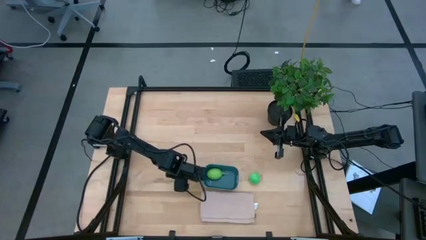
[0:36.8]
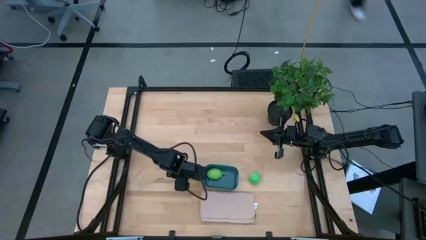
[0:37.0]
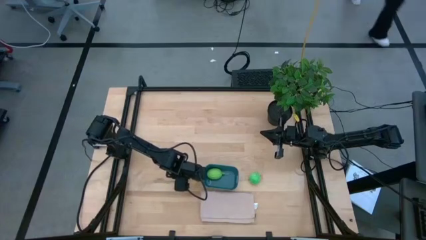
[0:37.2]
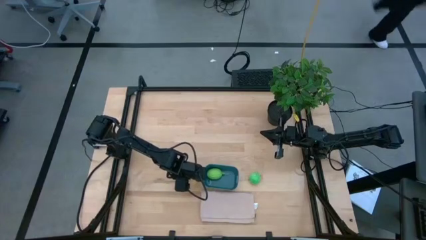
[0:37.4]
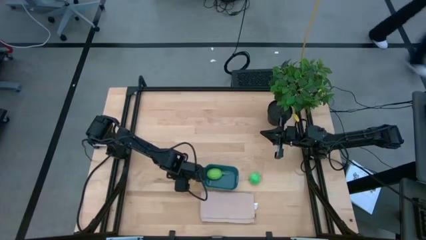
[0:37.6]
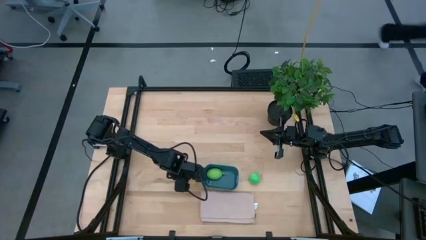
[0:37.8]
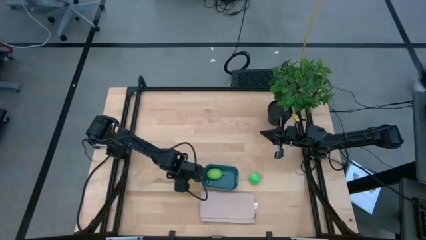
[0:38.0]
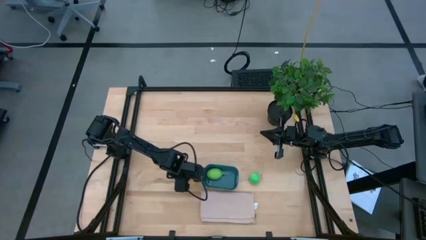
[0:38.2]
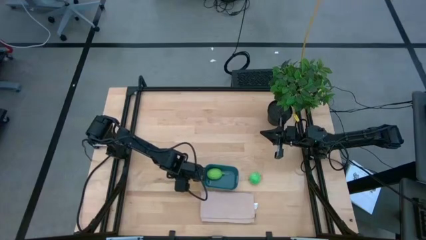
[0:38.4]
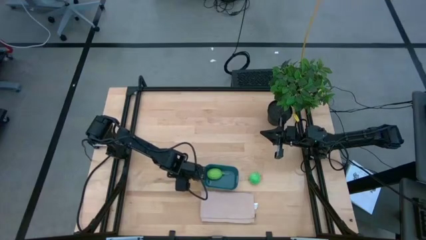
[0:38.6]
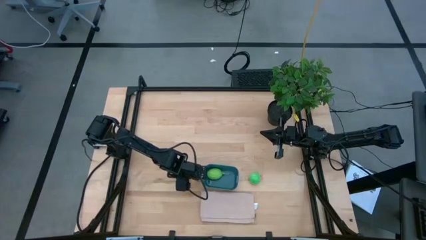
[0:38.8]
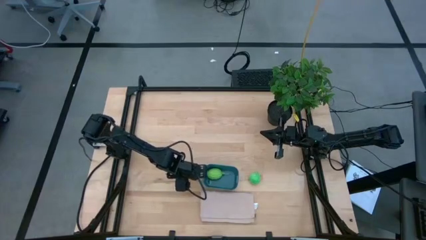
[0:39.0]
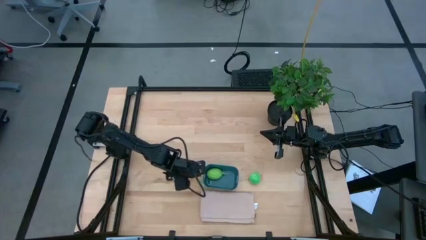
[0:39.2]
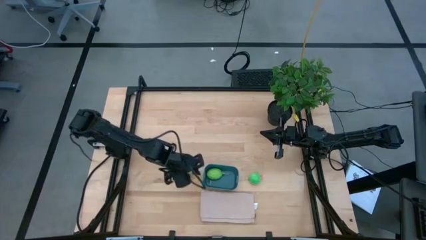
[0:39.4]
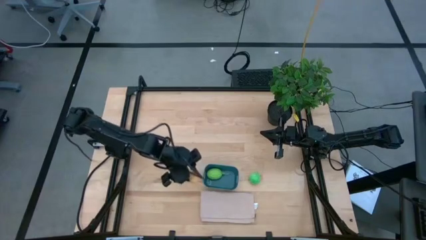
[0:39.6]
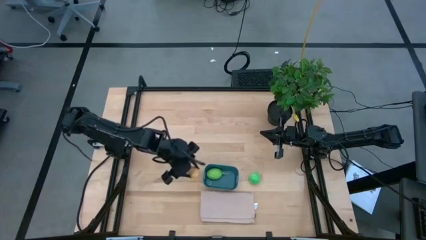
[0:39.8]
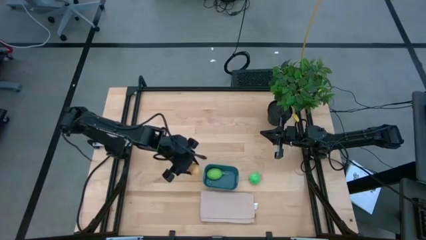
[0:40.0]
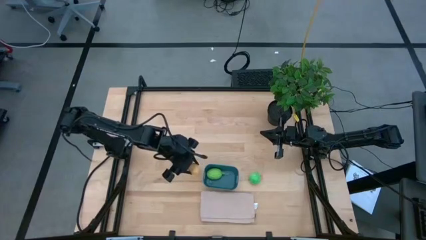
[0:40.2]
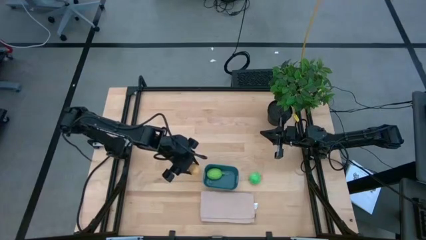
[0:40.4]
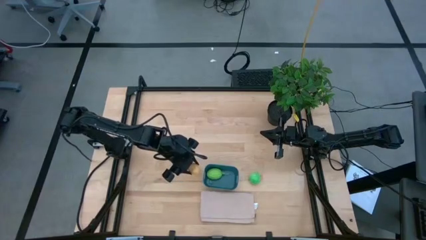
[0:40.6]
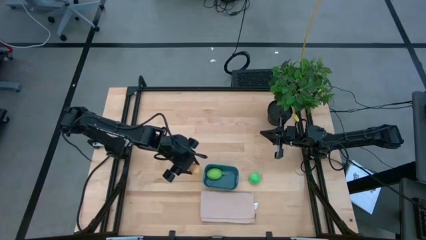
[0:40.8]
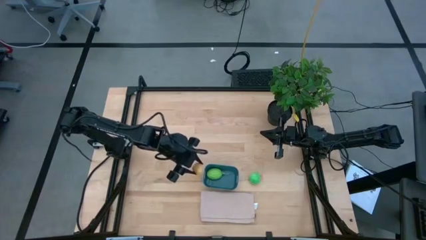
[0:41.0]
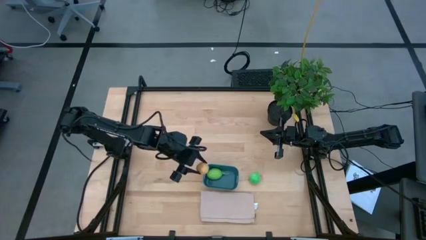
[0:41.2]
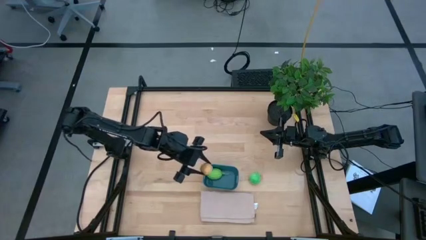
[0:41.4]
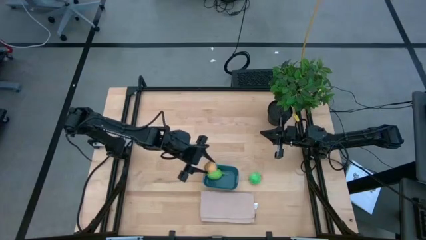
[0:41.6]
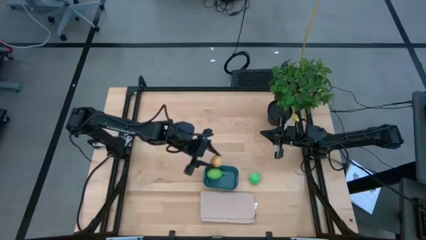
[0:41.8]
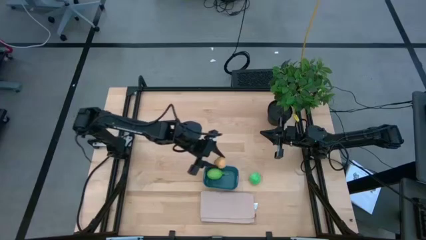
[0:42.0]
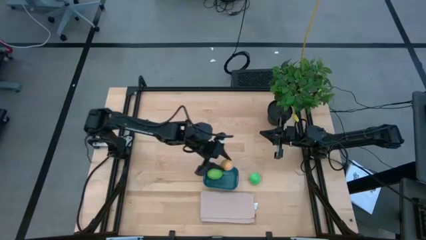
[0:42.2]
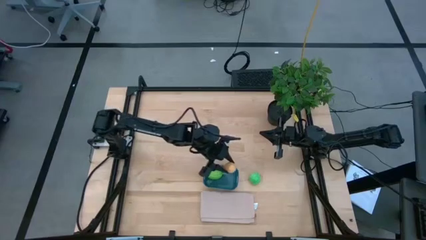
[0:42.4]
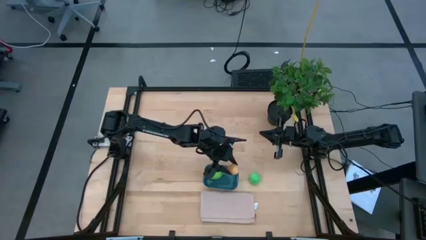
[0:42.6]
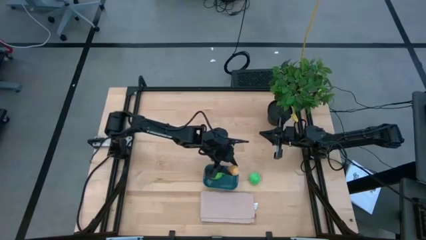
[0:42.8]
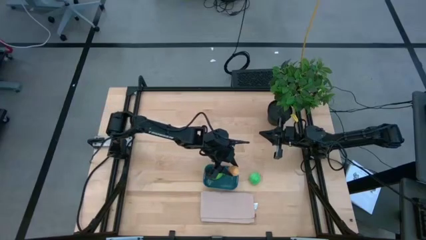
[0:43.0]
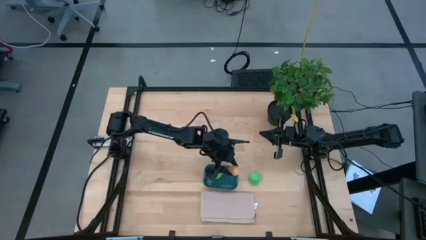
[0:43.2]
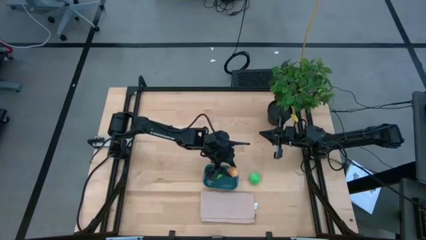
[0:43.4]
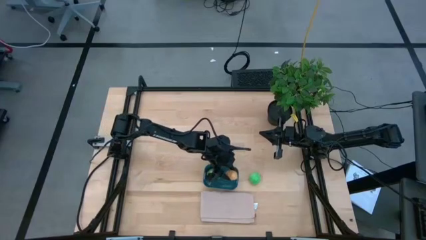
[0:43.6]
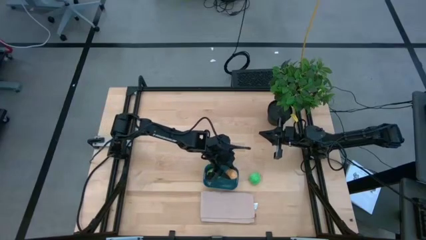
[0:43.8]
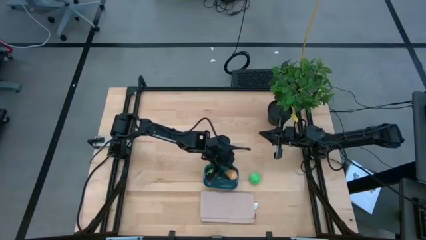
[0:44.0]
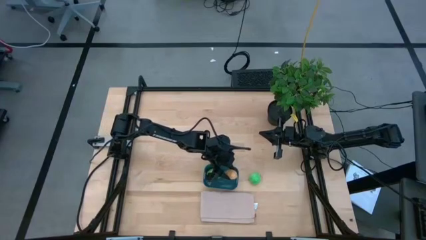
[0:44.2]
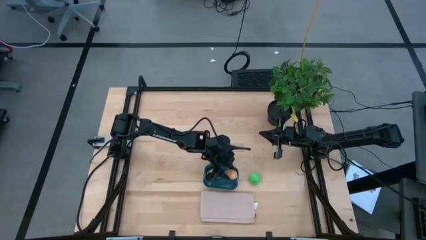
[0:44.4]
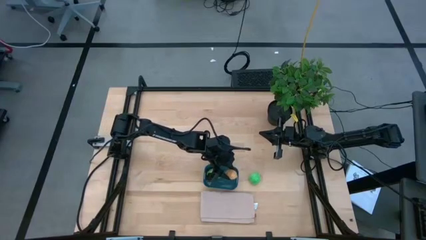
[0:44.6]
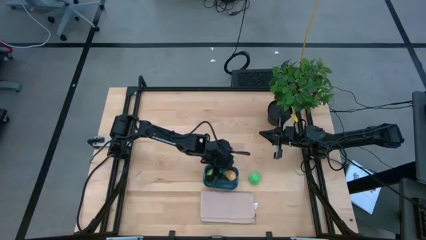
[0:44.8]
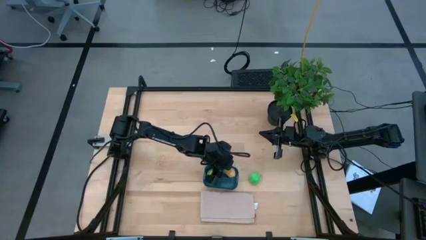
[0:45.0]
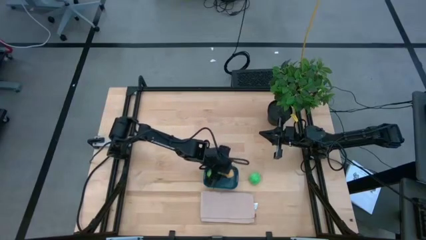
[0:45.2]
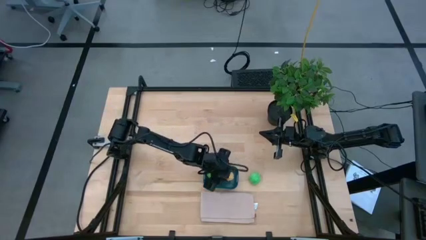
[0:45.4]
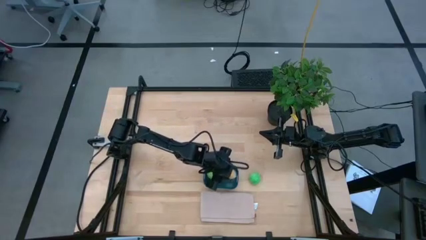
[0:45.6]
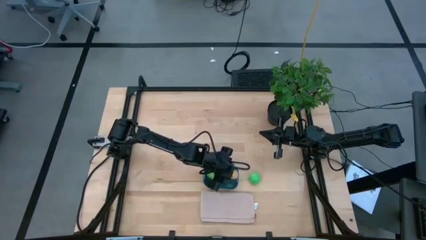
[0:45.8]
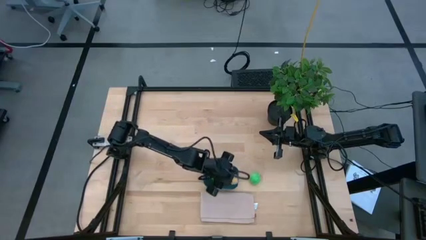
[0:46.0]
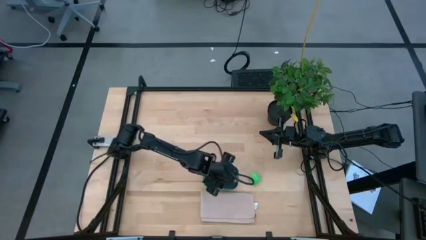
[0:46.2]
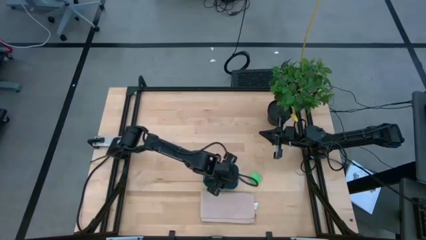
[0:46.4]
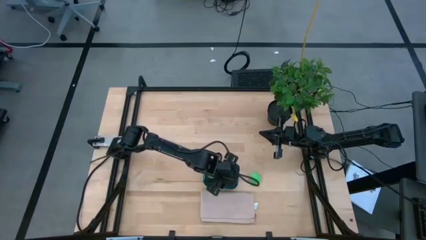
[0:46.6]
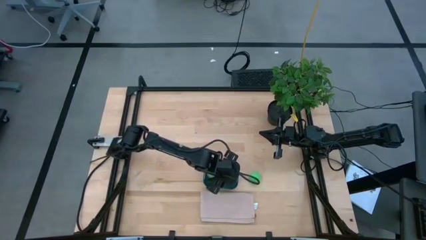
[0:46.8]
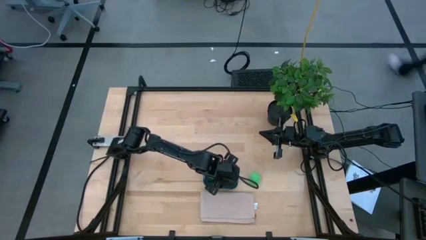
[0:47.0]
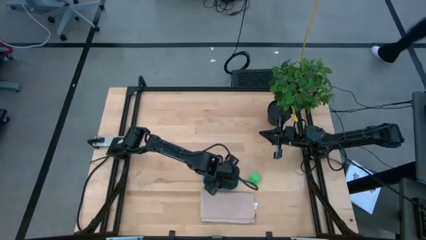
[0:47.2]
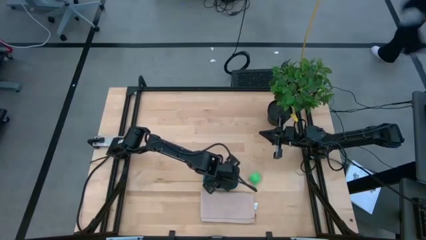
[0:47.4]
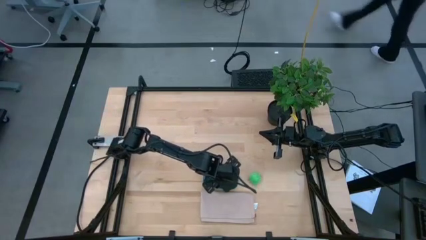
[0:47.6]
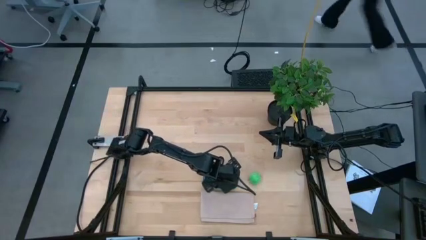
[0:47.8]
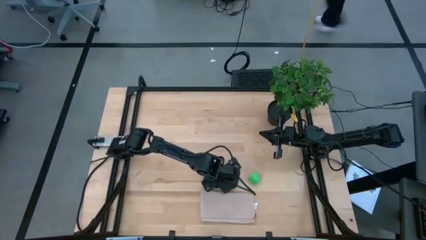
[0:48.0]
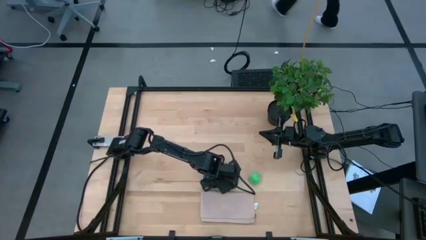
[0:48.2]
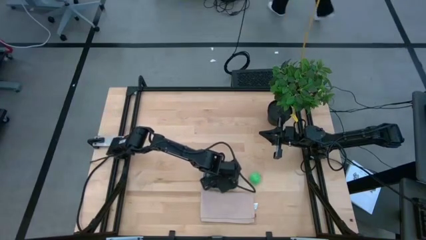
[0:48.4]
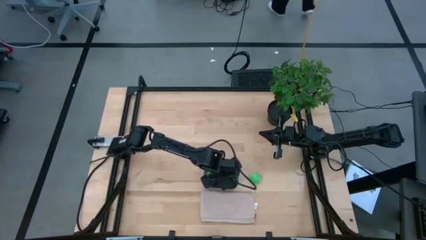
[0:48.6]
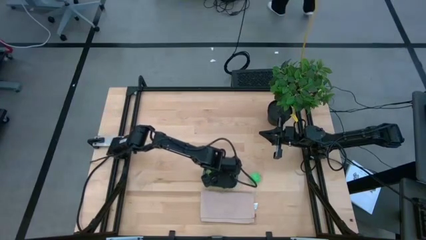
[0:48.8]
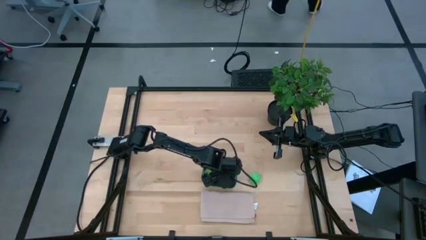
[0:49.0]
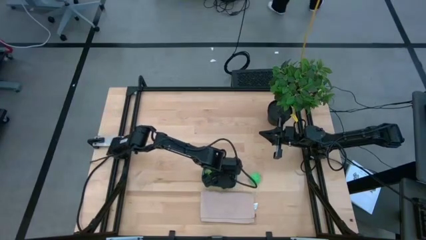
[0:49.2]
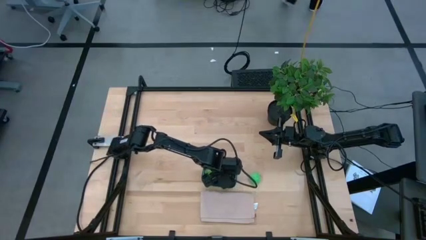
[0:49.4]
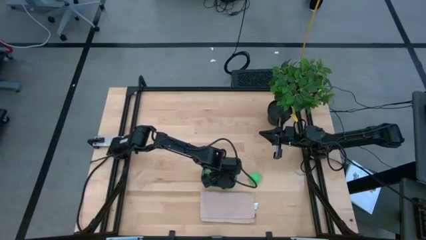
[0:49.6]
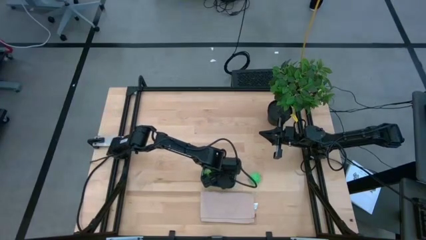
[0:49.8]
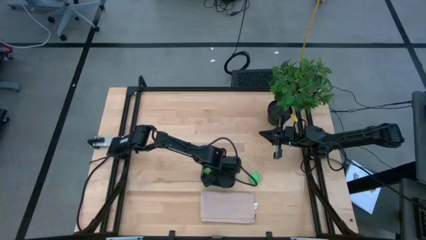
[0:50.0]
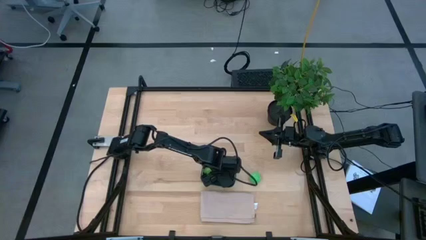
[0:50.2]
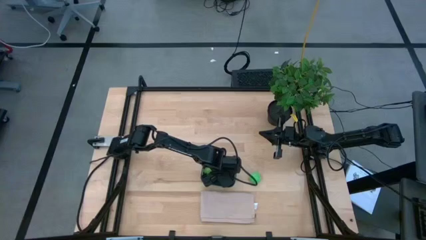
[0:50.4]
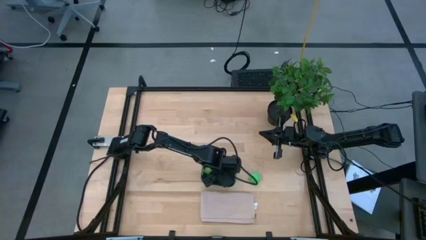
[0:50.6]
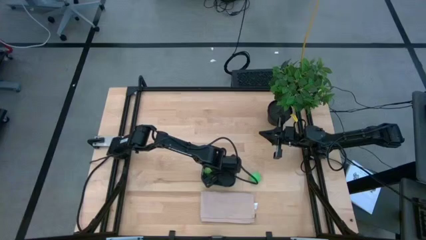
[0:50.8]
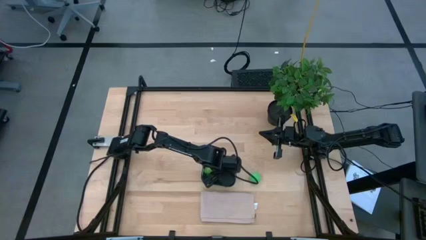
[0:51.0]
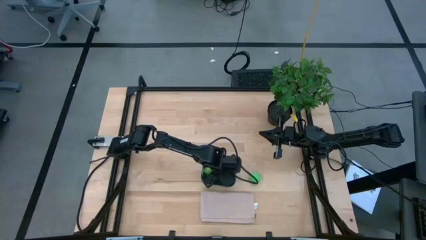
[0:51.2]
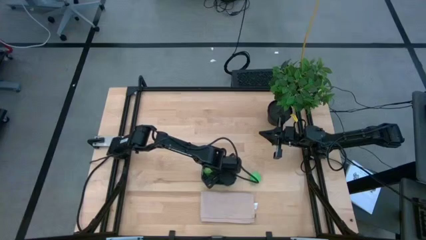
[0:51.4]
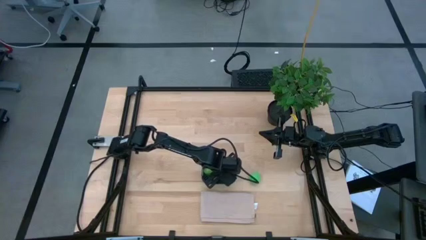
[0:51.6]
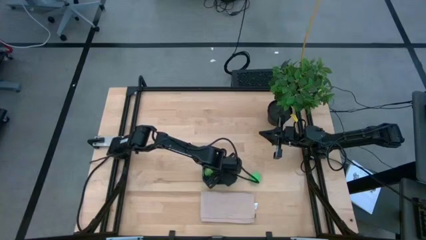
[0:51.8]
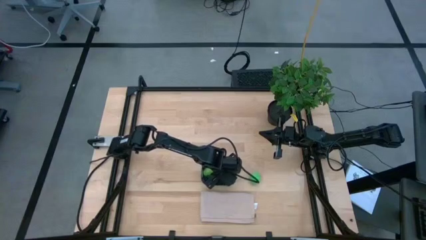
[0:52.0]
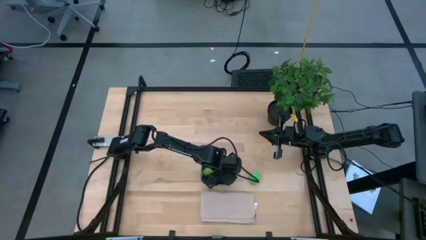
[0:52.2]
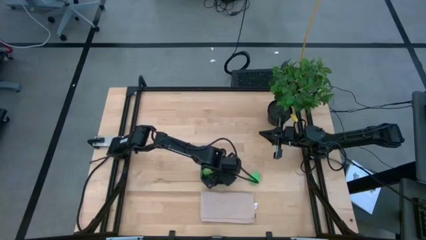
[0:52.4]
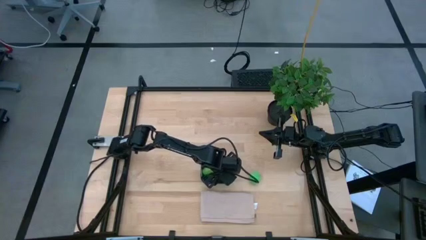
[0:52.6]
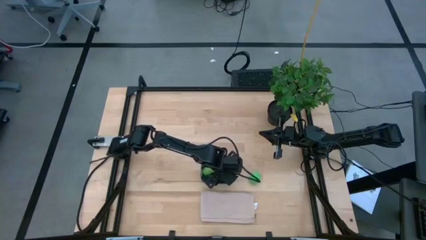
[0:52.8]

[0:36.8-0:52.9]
Task: Pick and placing Produce into tupperware
Put the brown potato into the dark blue bin
